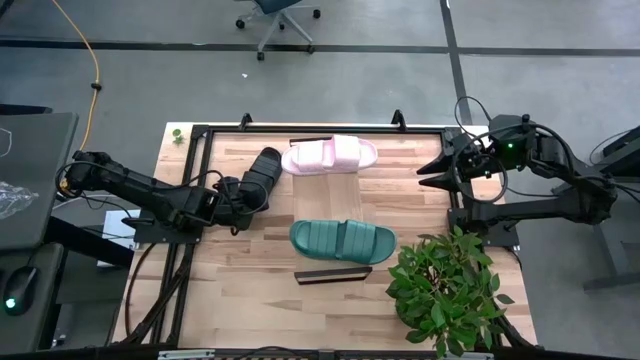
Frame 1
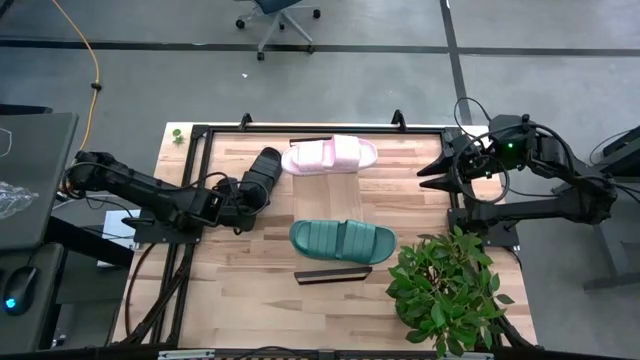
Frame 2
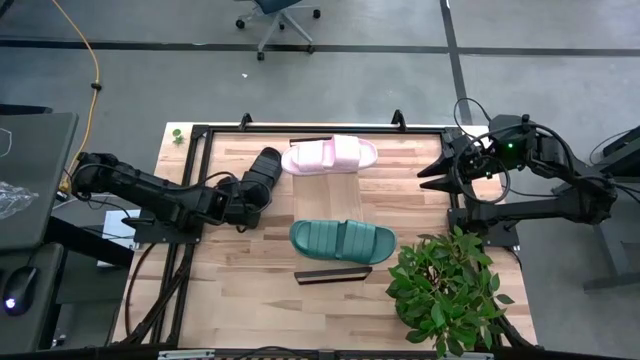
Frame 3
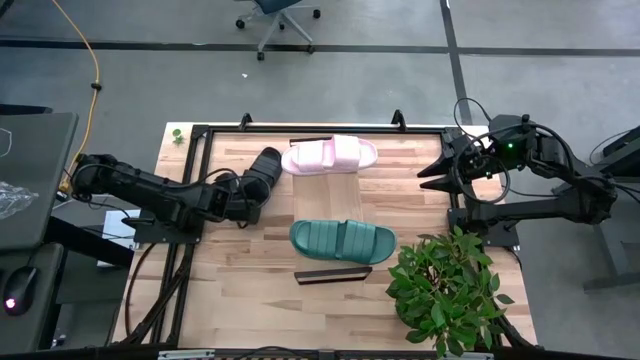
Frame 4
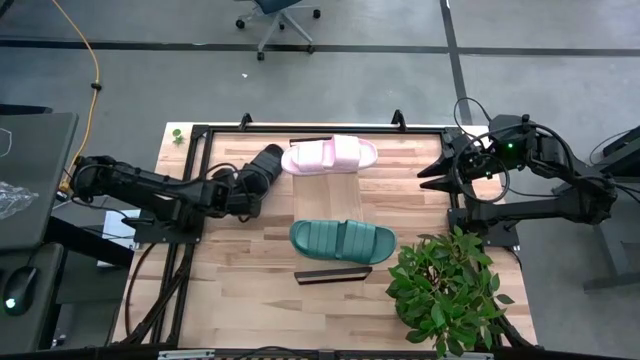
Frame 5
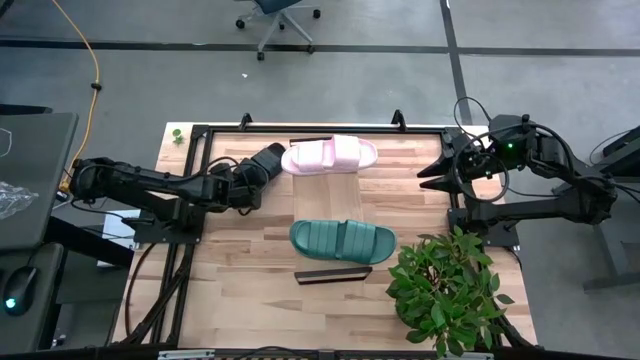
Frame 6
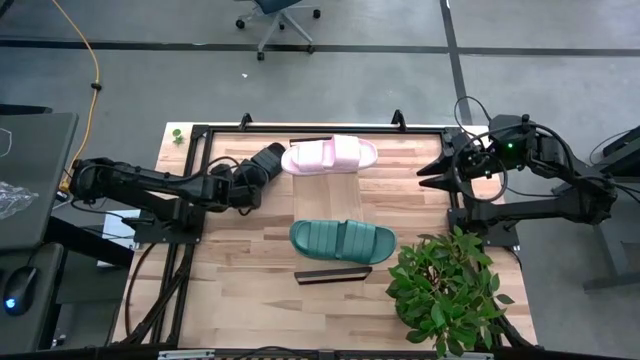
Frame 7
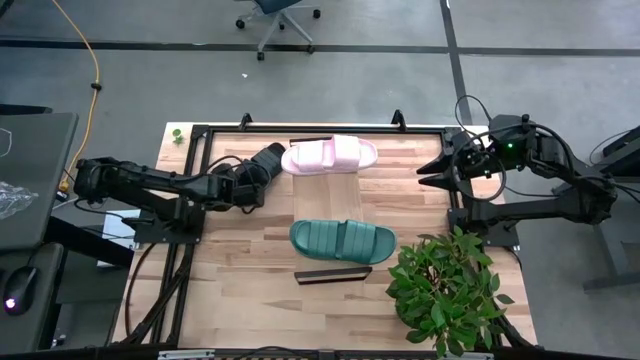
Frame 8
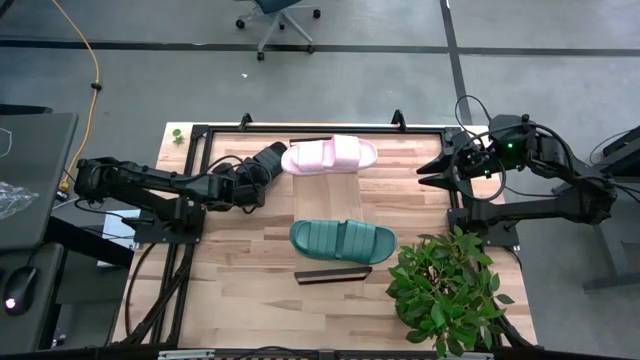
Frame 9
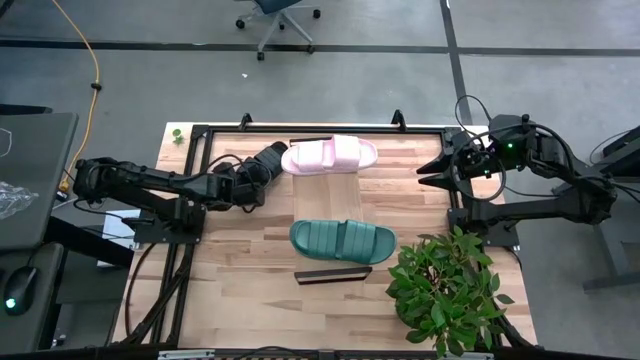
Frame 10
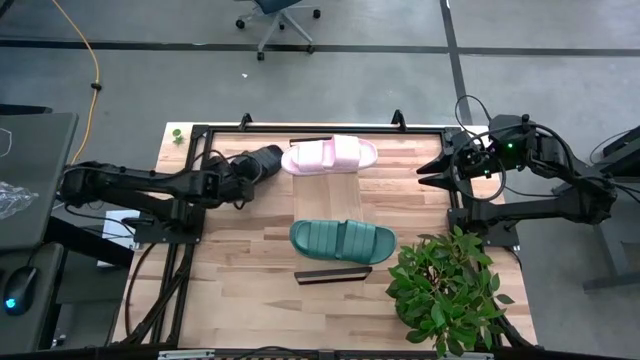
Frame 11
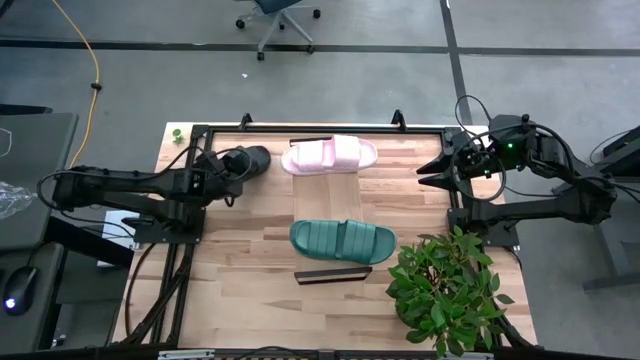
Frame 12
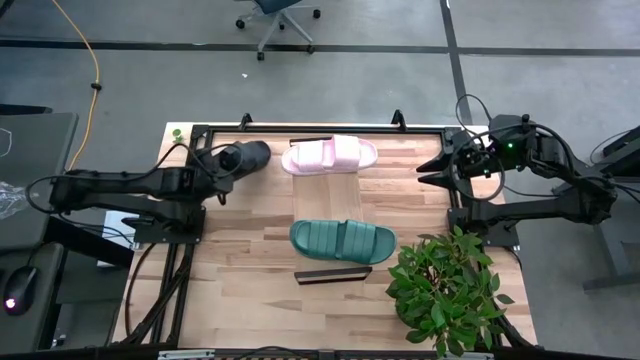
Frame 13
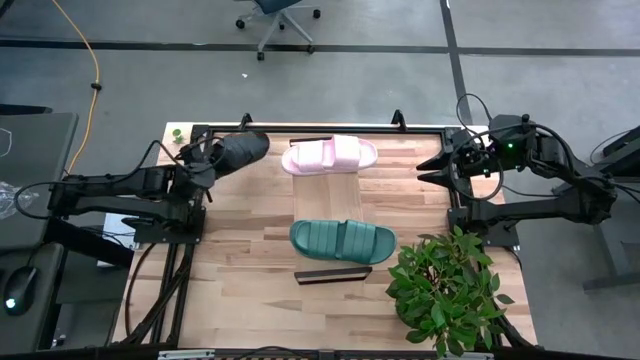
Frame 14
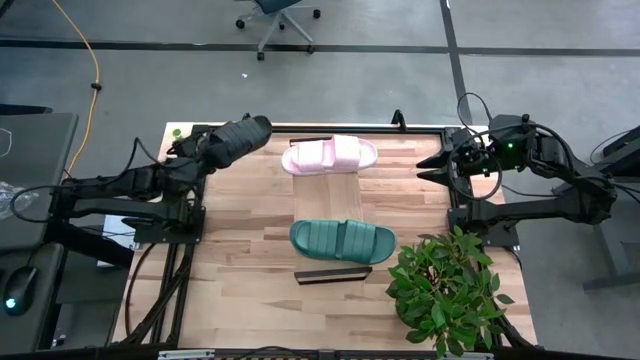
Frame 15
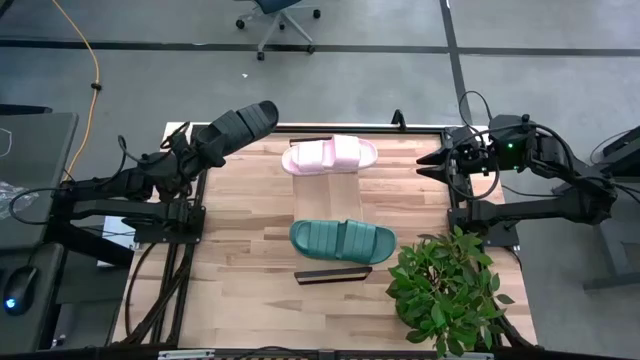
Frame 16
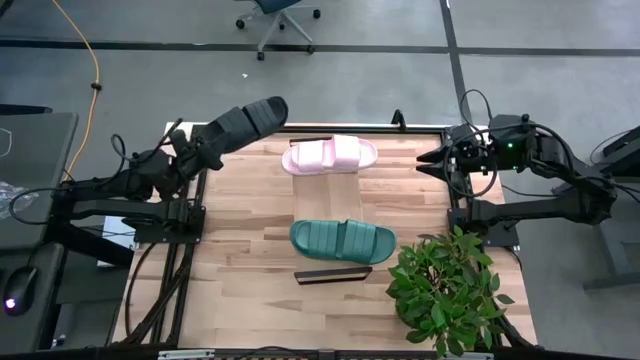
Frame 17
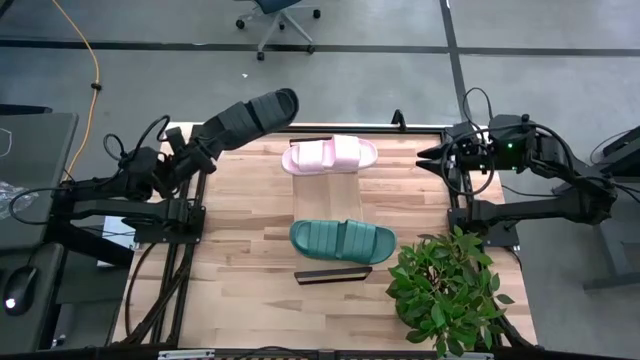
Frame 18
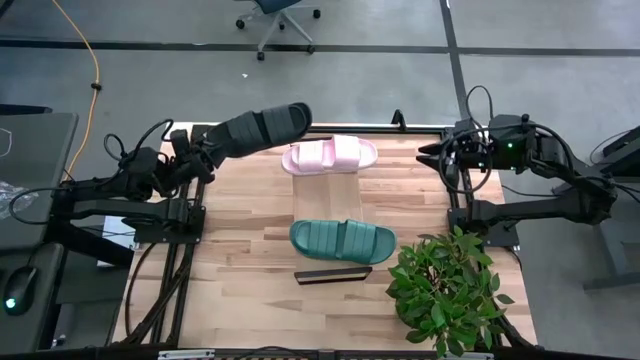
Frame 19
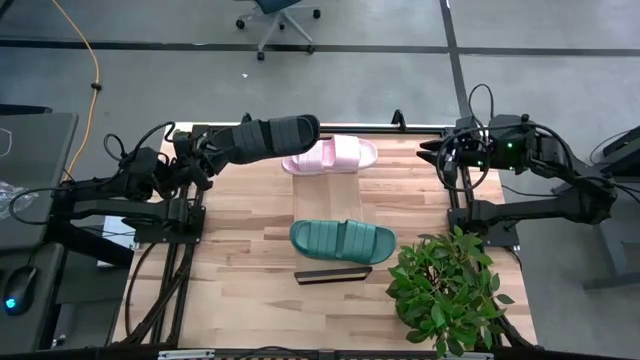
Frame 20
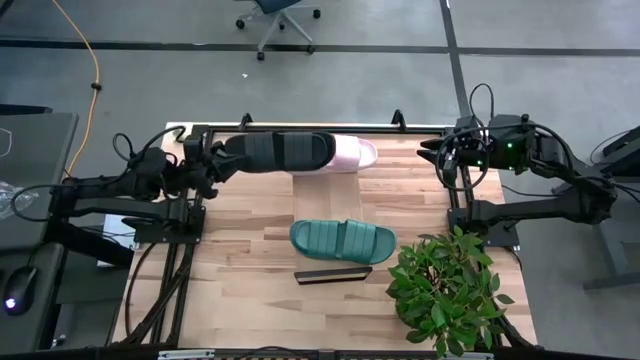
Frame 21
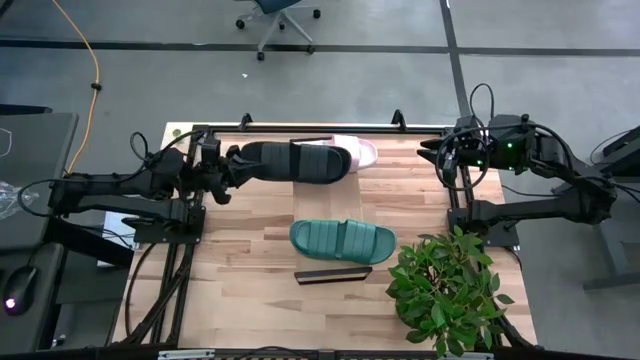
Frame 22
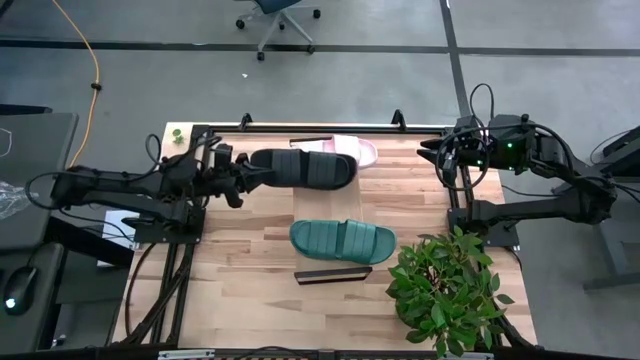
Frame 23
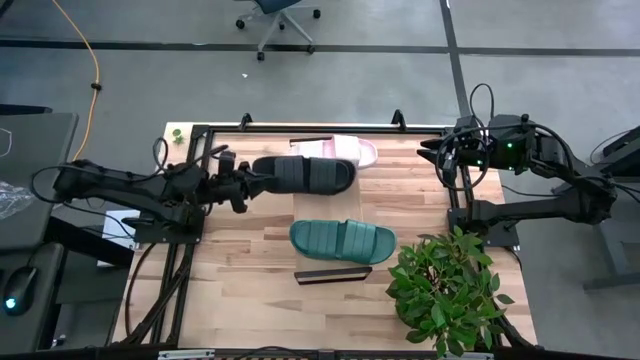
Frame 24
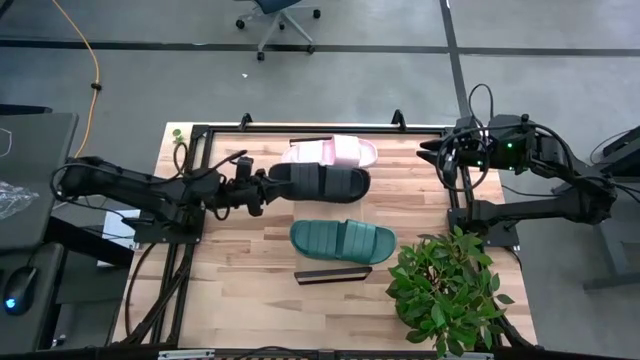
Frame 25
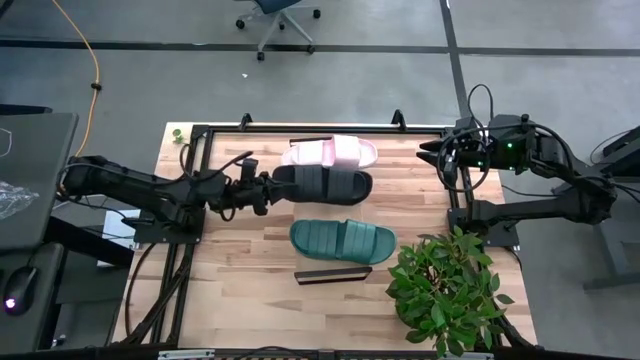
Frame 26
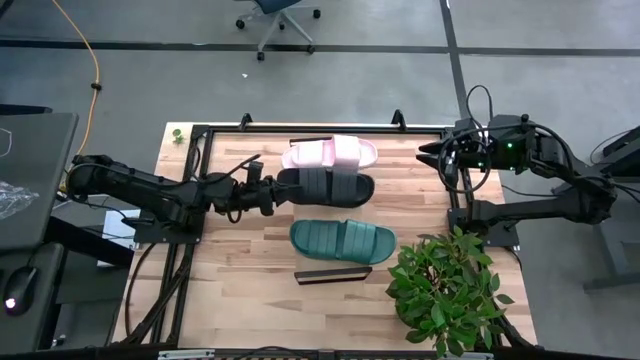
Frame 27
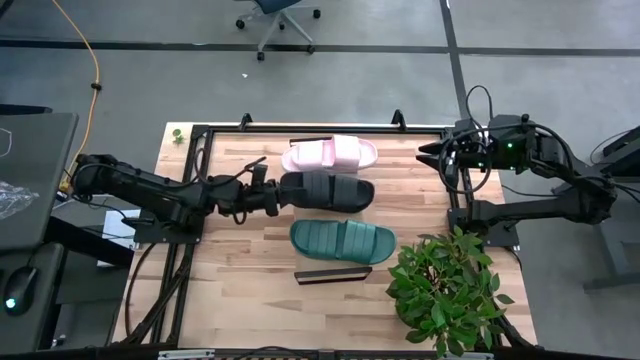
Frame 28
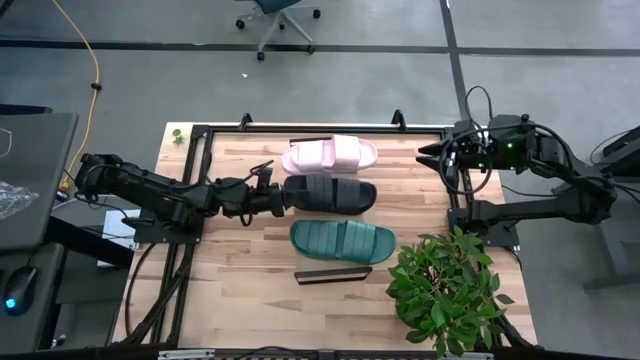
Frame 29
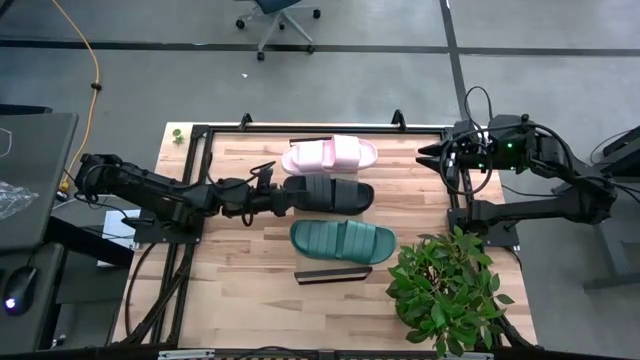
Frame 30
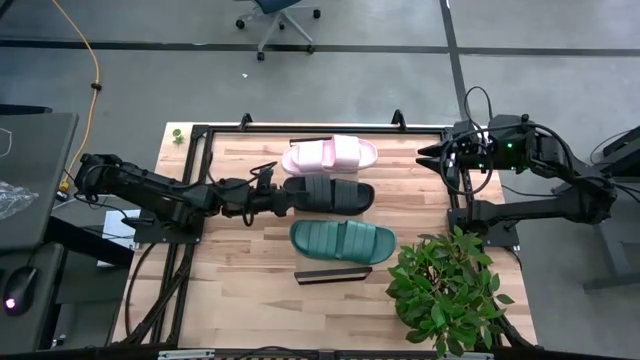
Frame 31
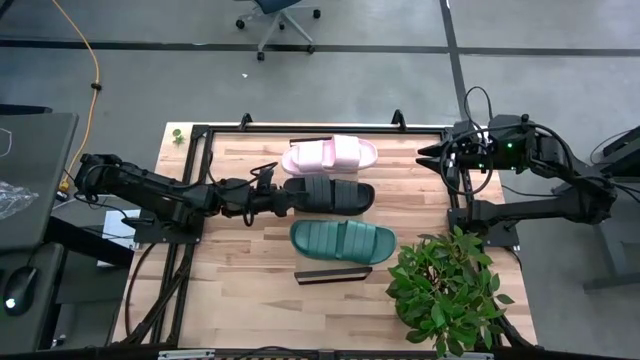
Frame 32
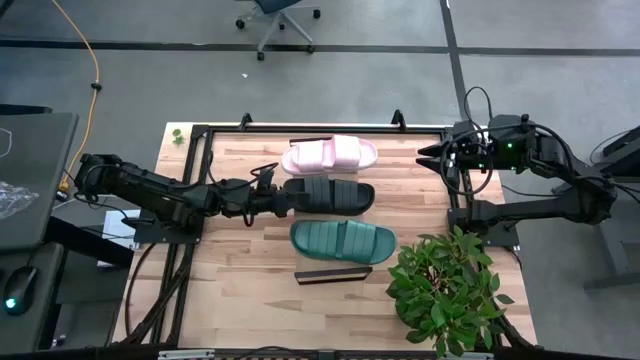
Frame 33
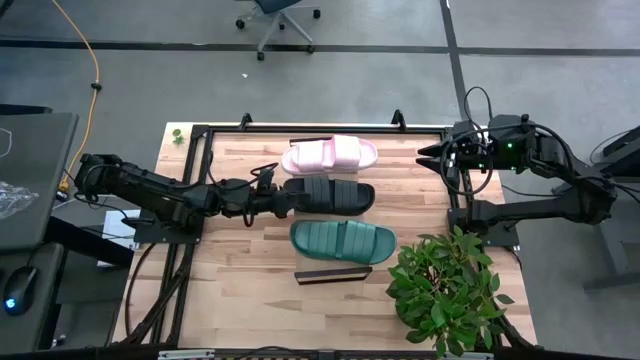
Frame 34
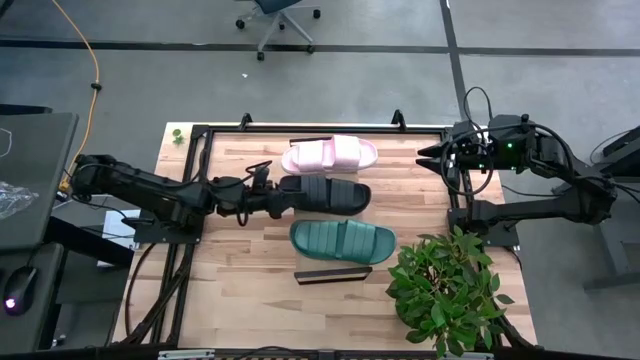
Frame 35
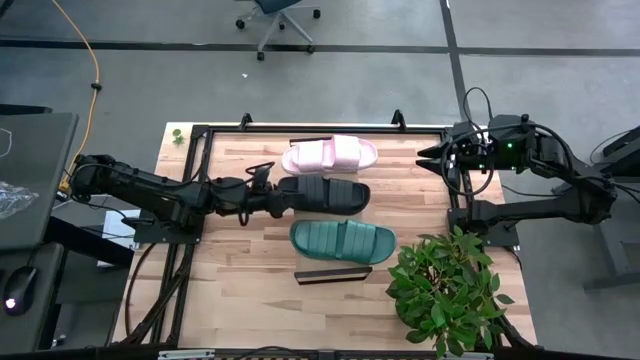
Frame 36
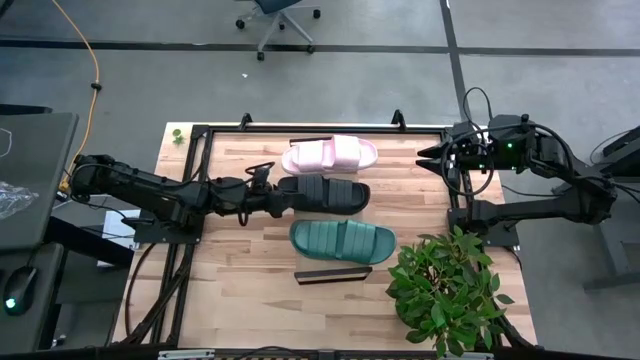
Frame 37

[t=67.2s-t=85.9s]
Task: Pick and place slippers onto the shelf
Put the black pair of slippers on the shelf

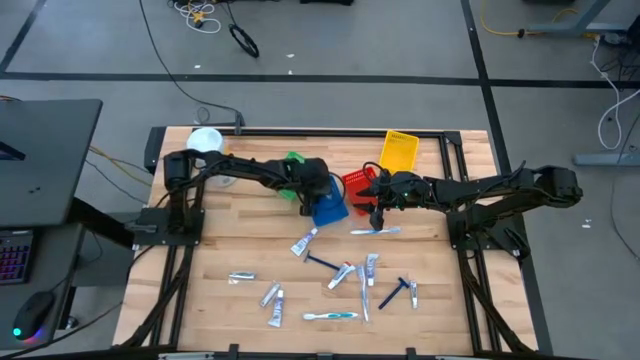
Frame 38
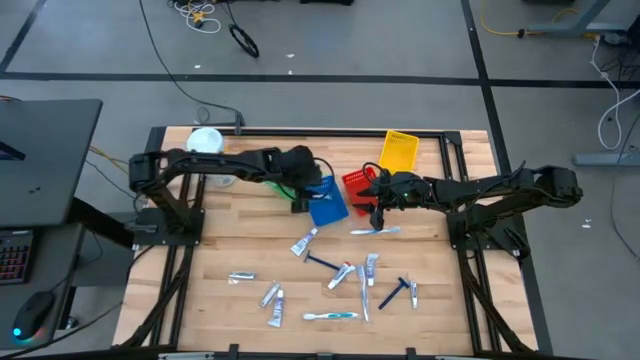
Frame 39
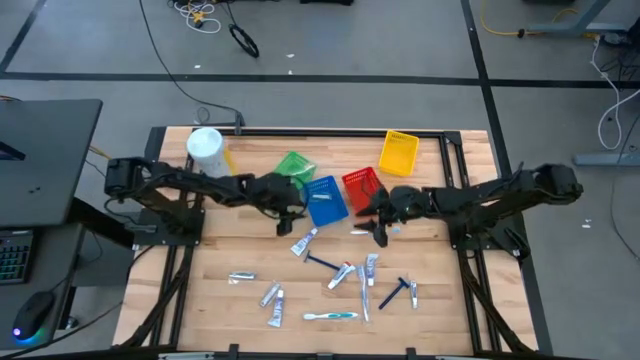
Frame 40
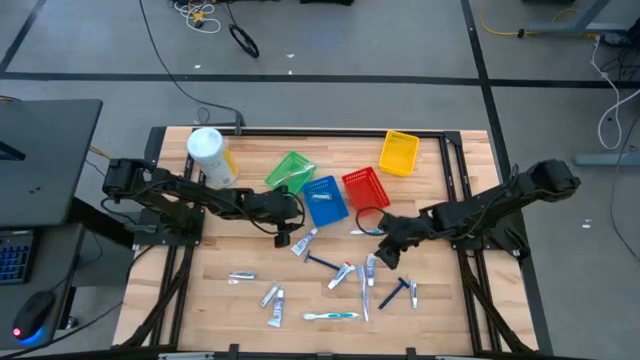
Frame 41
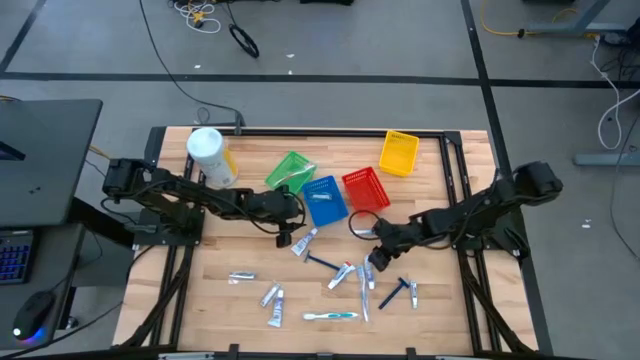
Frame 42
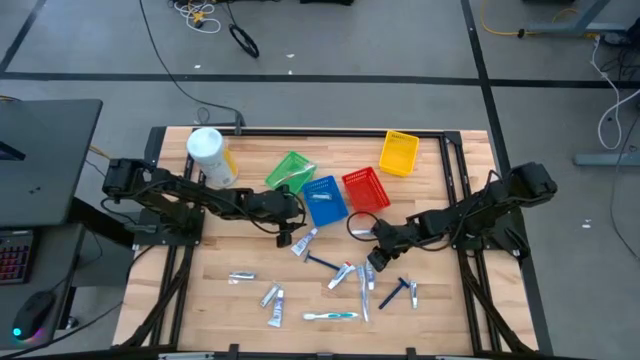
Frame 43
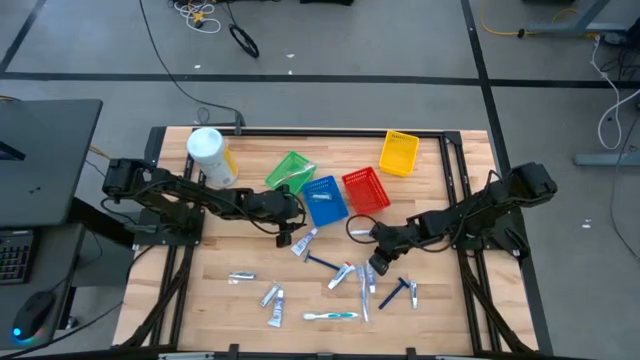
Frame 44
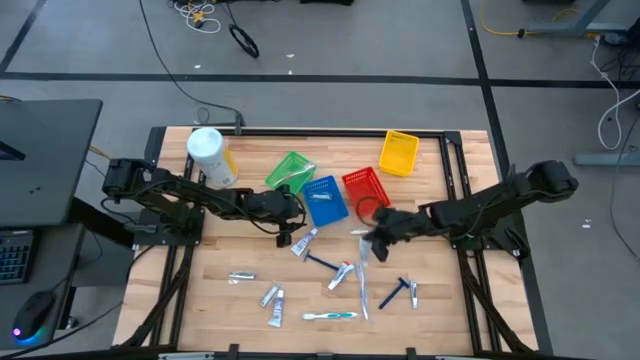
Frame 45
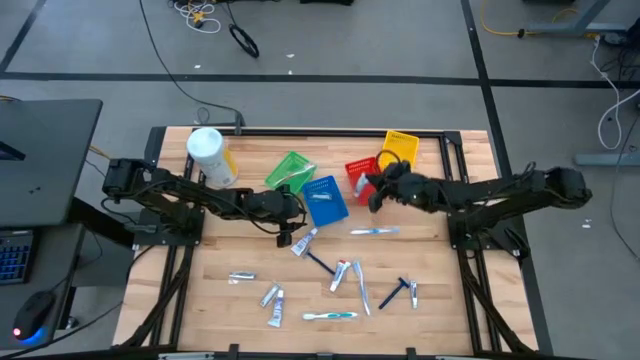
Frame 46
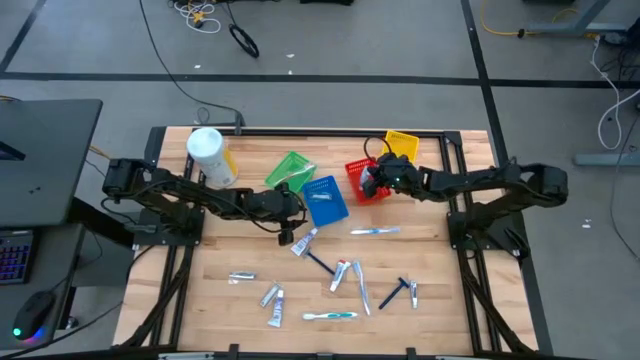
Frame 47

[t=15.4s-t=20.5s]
Task: Pick & Place Travel size toiletries
Put the middle right toothpaste into the red bin
